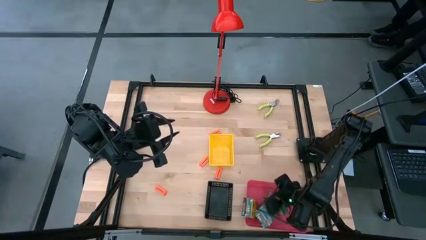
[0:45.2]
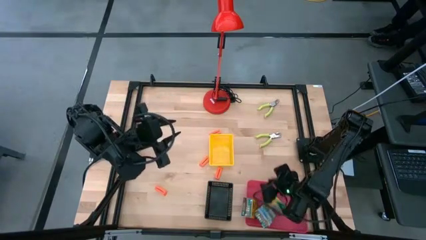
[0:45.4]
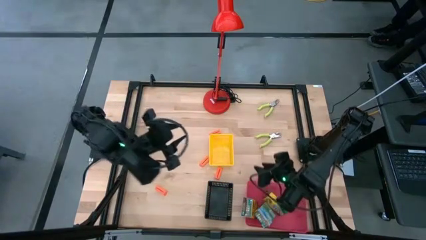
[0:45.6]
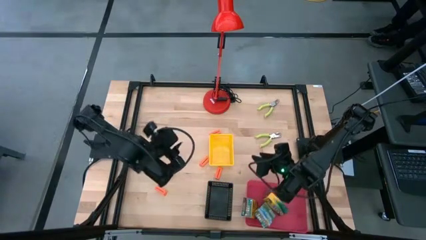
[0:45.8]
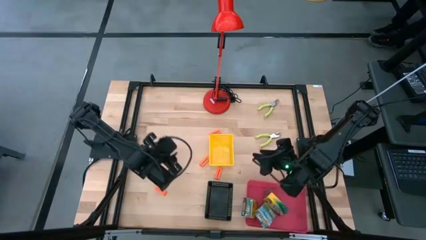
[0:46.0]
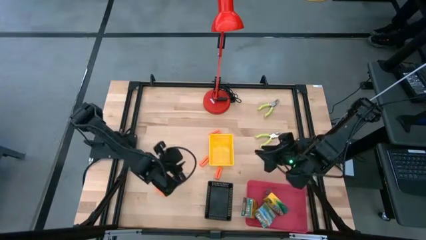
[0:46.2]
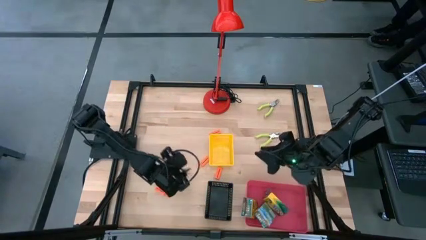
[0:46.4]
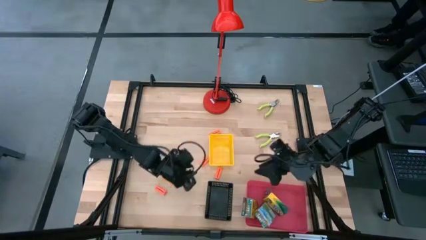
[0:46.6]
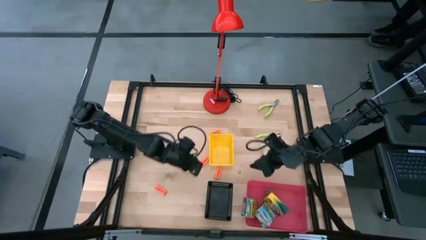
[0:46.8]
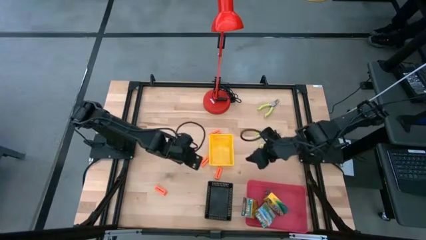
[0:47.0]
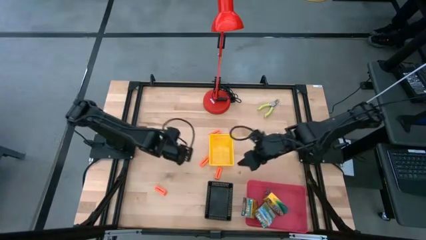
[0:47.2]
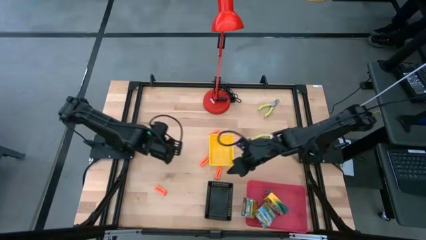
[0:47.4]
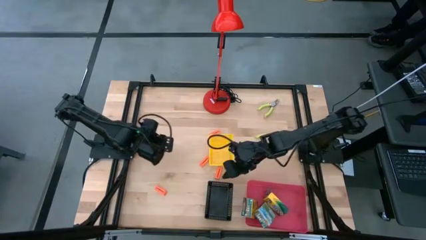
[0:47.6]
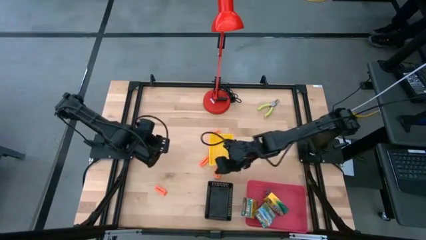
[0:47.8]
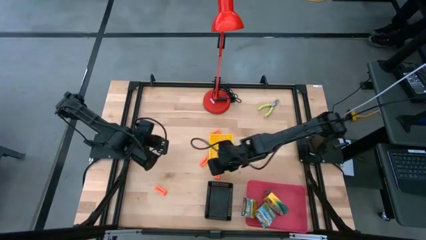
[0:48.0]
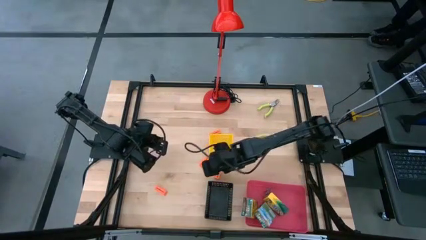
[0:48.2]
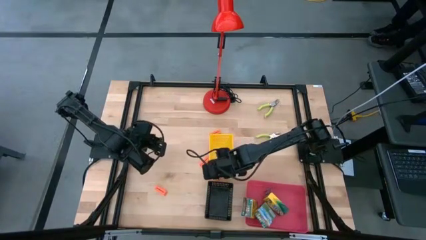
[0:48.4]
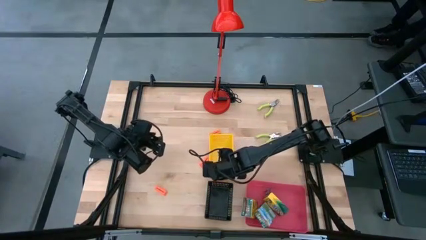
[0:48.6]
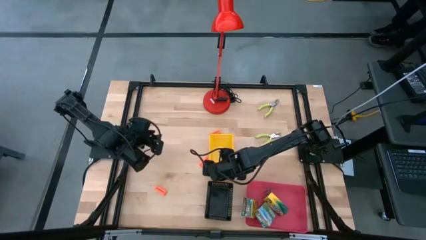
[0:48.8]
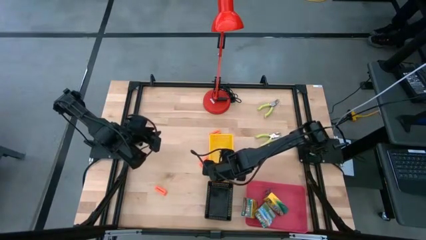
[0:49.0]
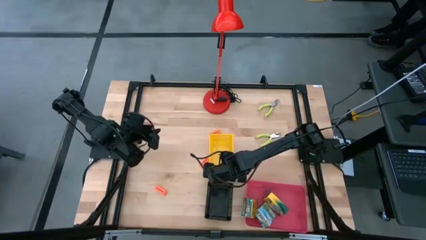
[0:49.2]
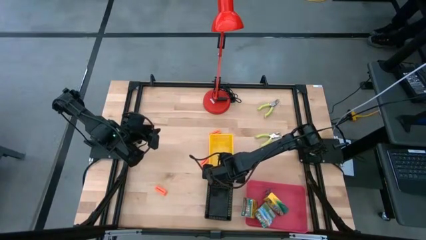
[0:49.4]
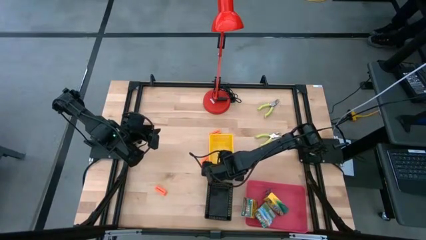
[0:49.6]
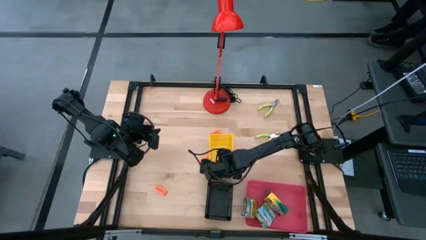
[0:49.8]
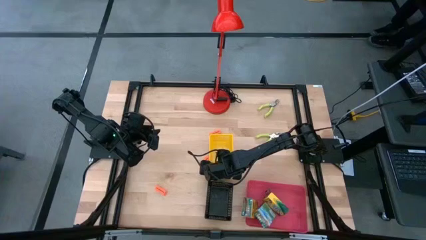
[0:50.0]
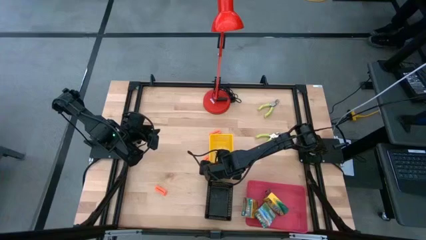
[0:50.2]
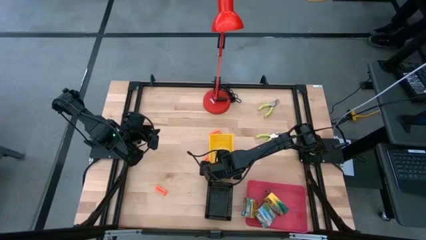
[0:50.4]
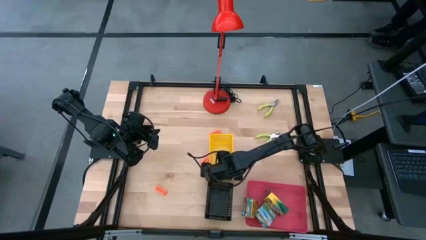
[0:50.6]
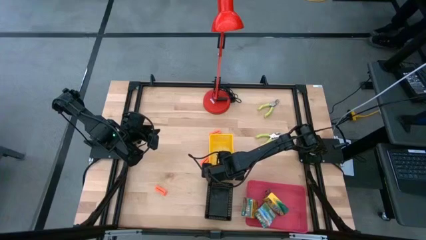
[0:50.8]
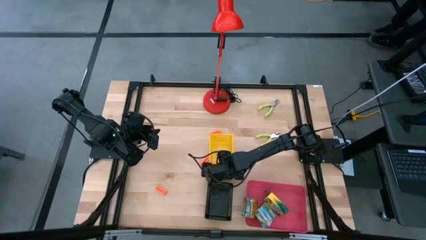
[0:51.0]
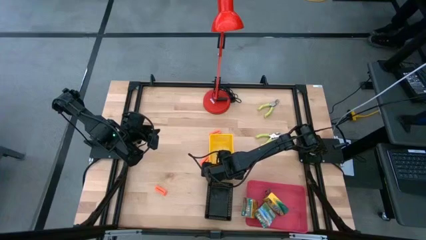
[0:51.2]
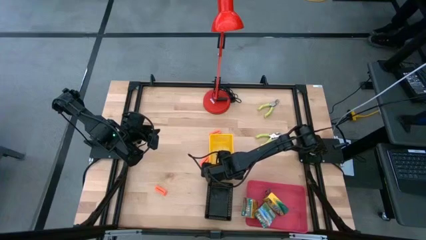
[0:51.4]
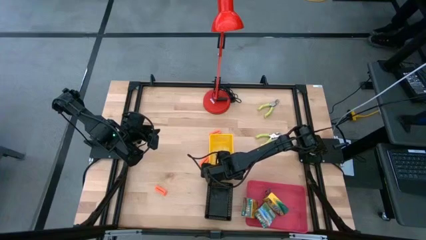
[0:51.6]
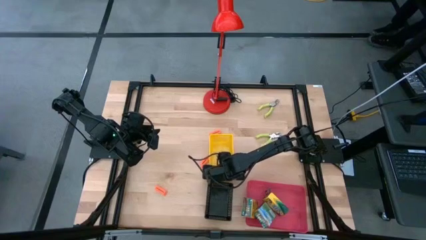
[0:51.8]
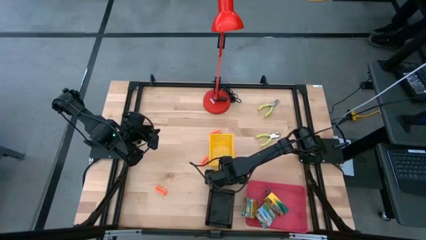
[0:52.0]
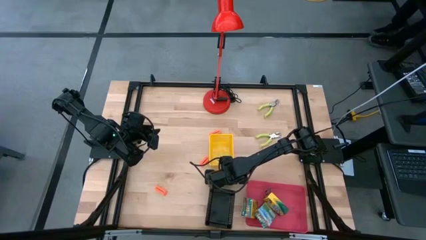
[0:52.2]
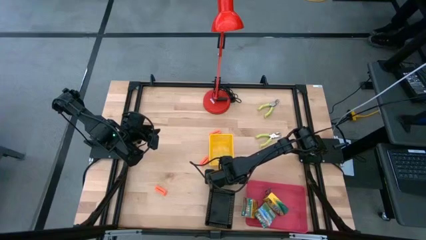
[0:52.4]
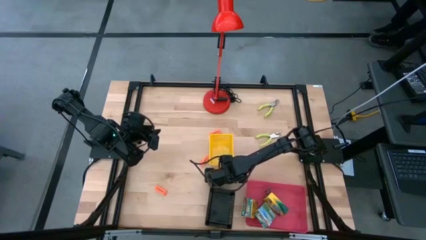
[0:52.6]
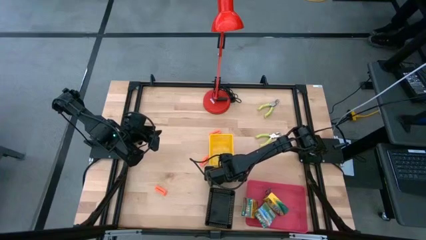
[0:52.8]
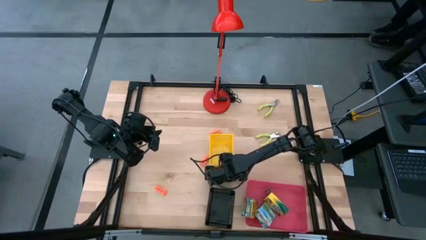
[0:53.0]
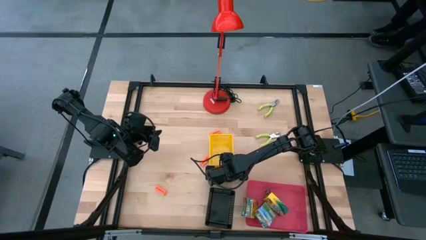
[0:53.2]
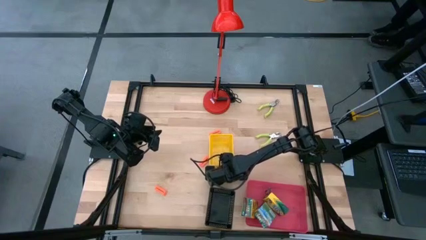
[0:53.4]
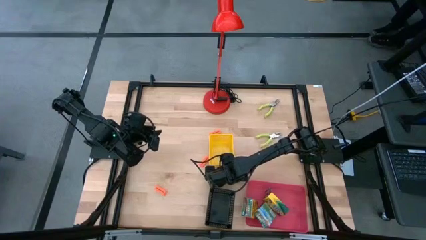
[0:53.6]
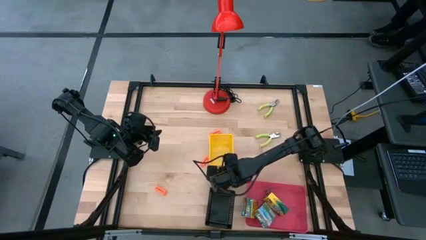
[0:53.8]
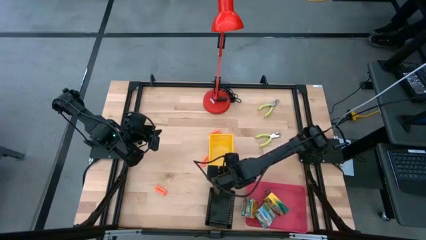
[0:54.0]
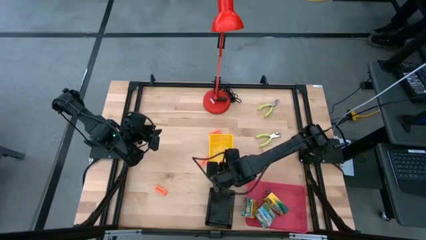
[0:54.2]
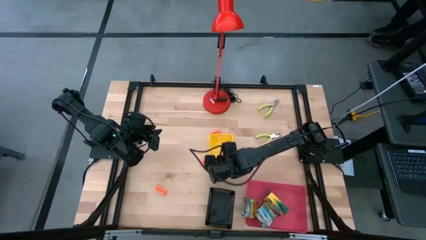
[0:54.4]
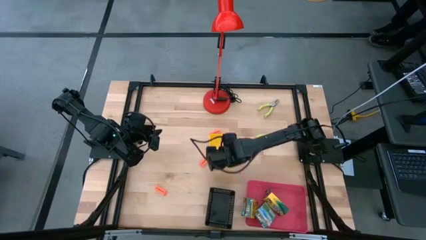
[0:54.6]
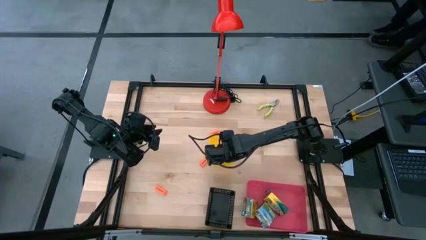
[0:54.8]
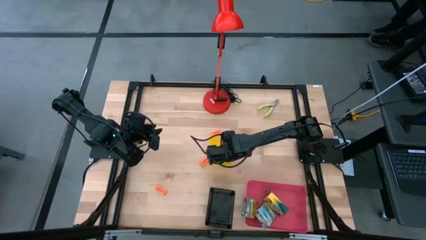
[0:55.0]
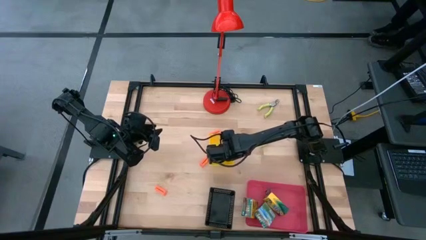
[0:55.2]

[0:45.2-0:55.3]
Task: Pick & Place School Supplies
Put the orange eraser into the yellow bin
